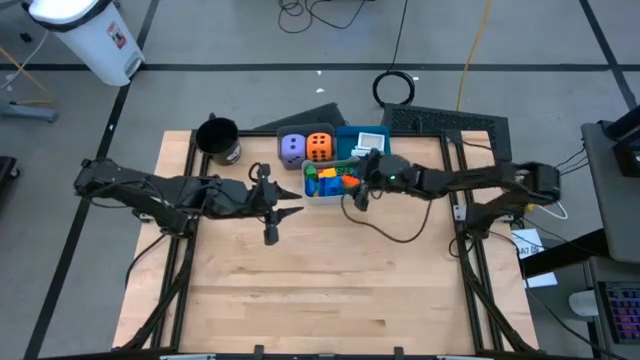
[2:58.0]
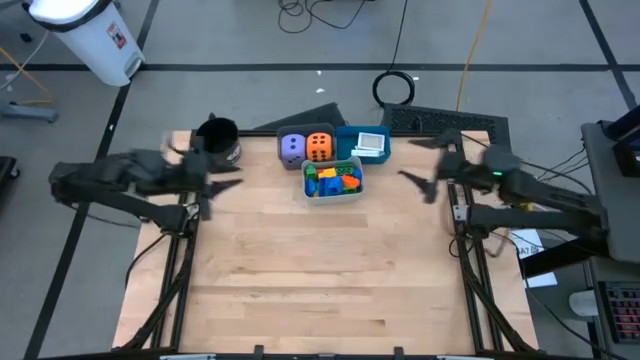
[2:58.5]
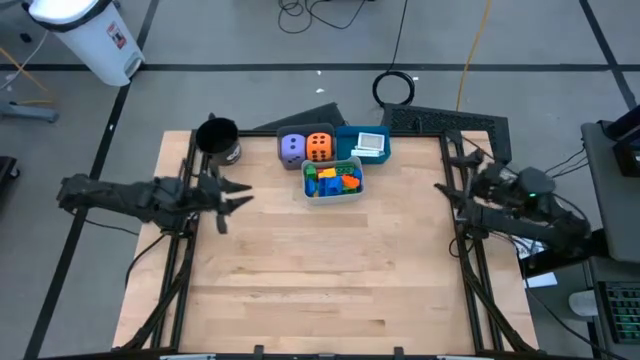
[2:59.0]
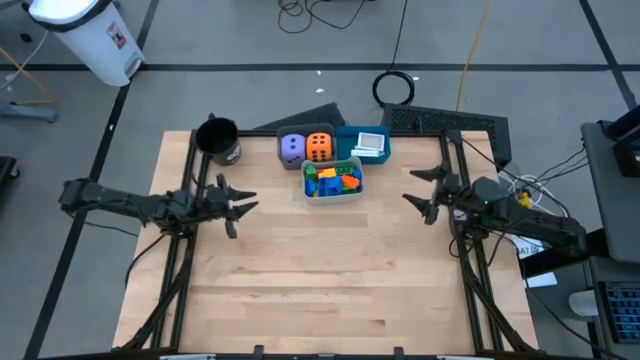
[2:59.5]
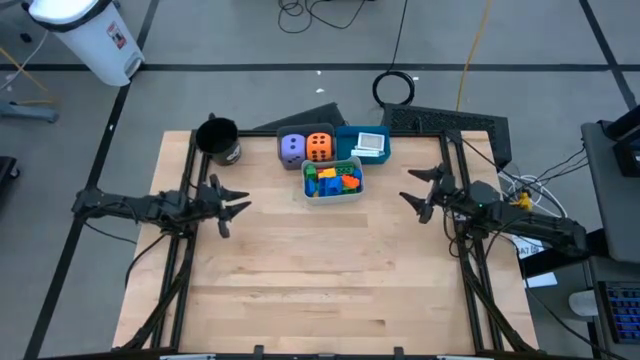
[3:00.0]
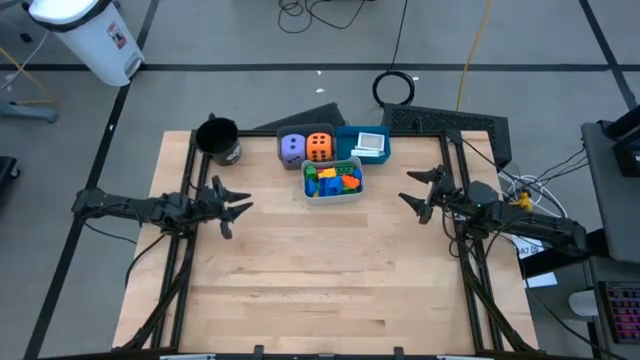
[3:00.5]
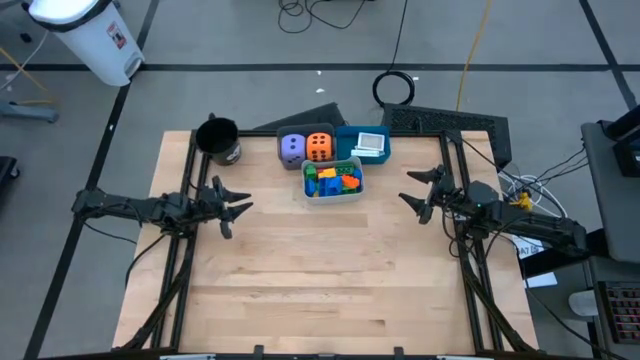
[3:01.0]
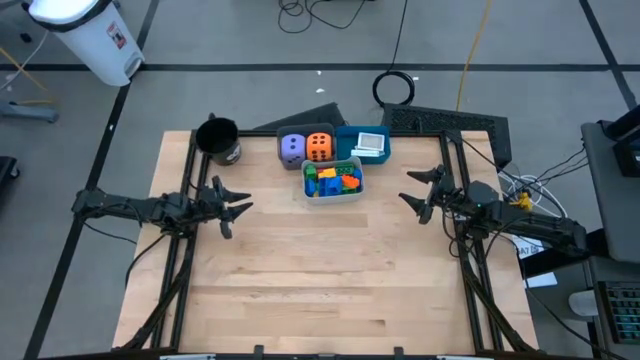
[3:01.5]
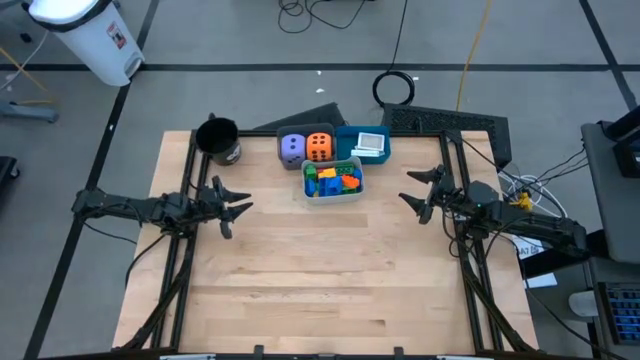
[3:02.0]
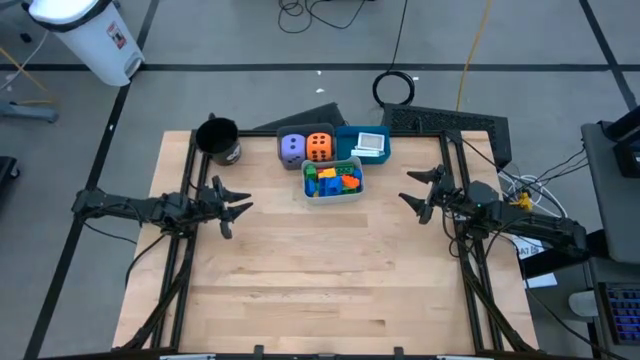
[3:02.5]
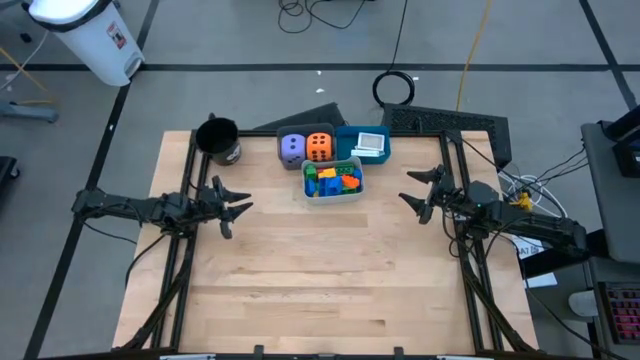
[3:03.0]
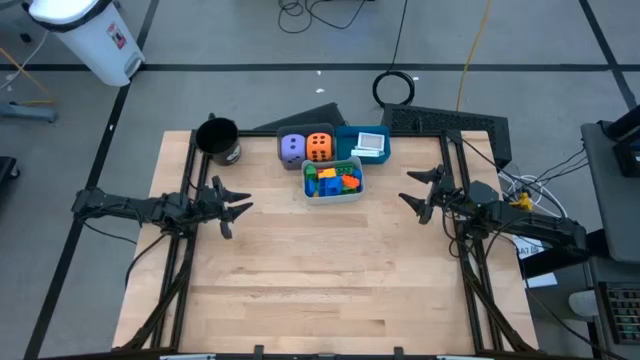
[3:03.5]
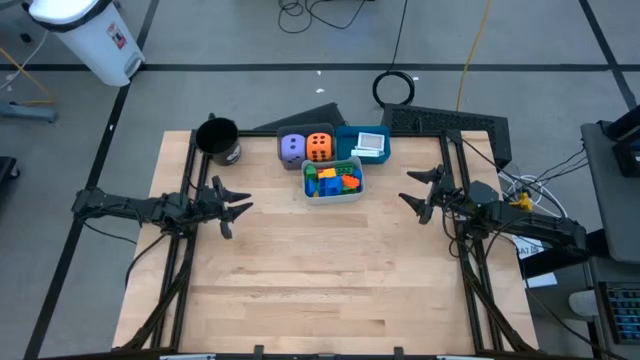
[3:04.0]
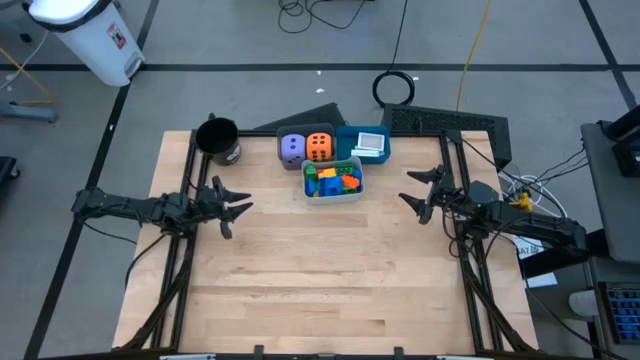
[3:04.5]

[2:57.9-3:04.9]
Task: Pick & Place Toys
Return to Home Position
